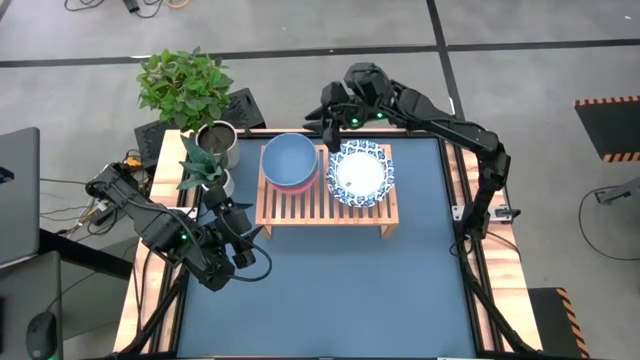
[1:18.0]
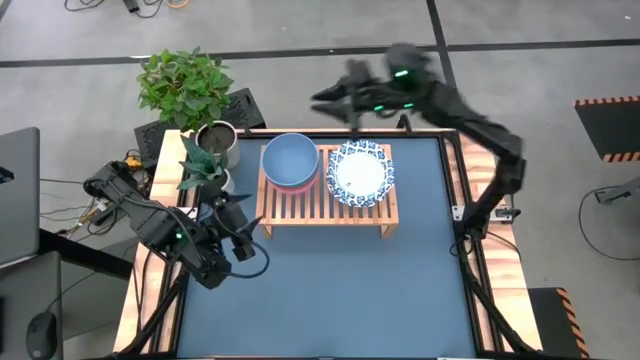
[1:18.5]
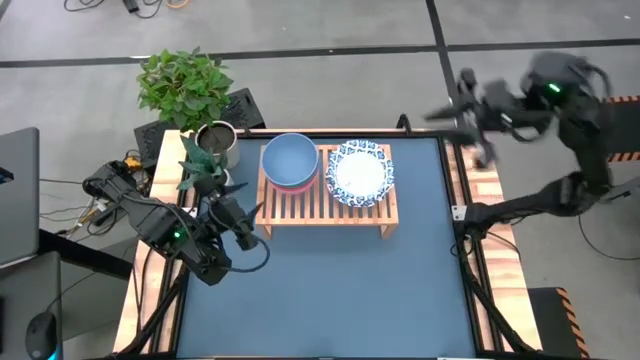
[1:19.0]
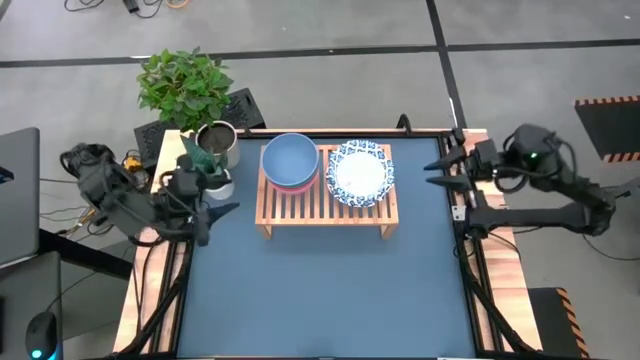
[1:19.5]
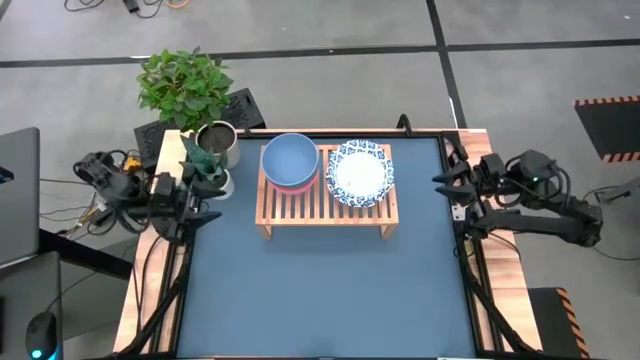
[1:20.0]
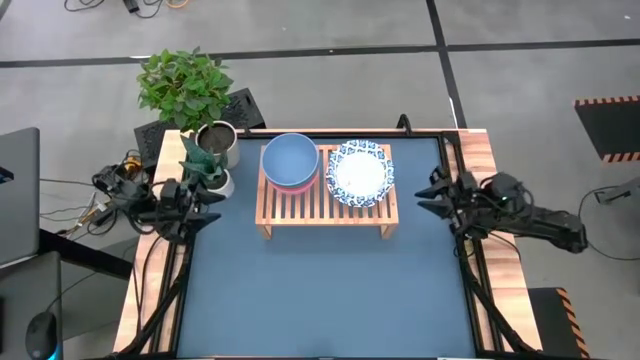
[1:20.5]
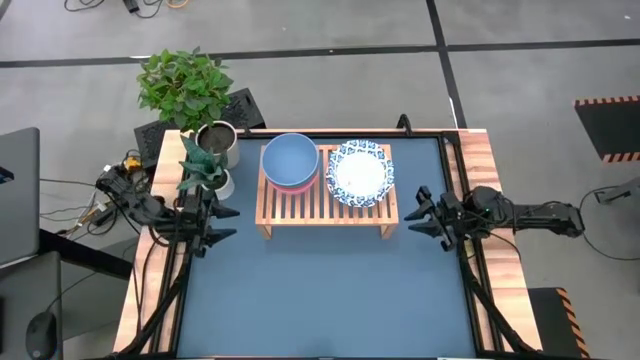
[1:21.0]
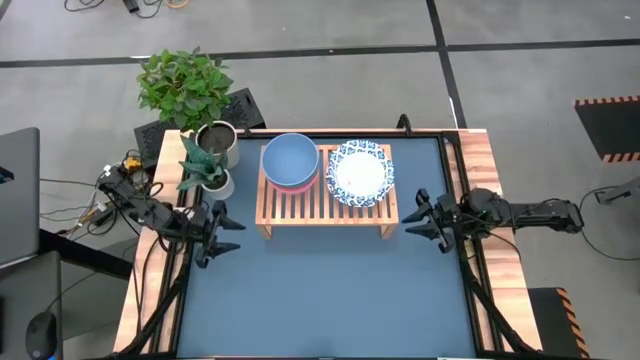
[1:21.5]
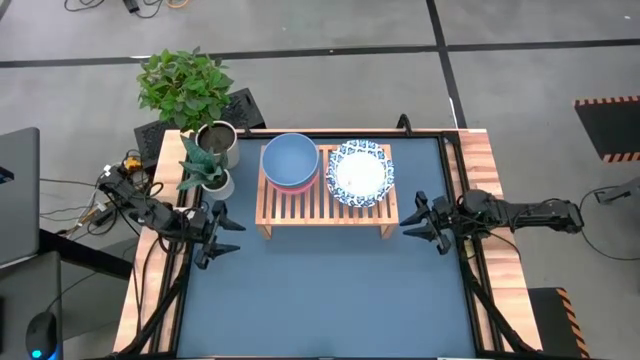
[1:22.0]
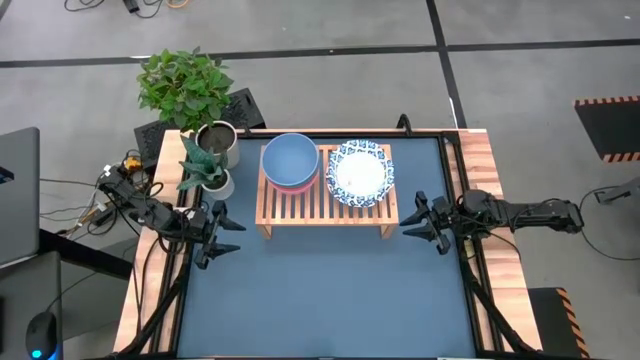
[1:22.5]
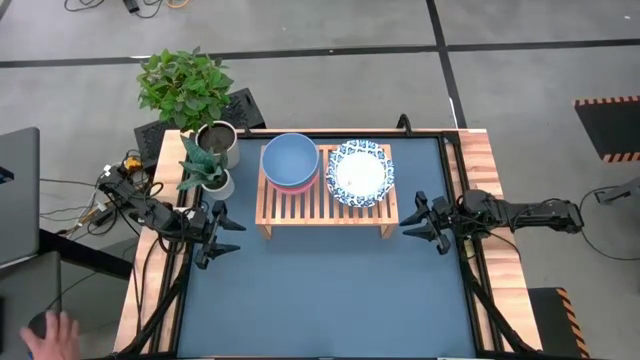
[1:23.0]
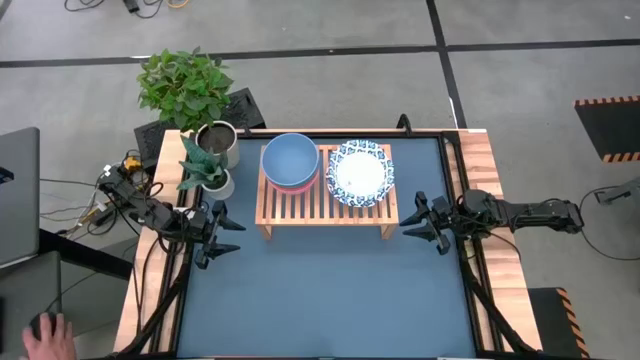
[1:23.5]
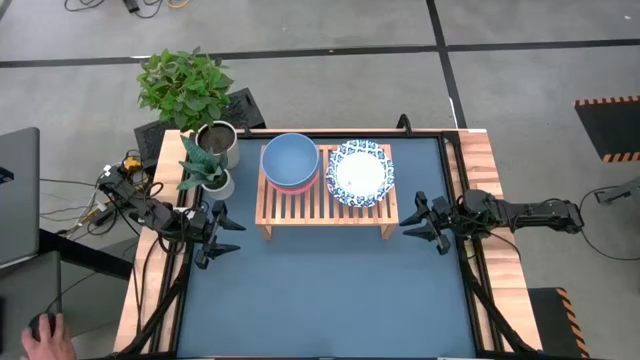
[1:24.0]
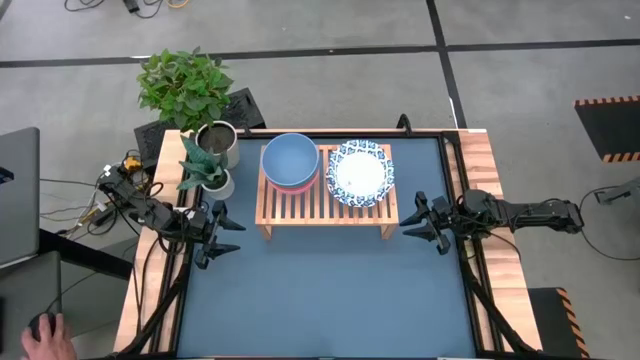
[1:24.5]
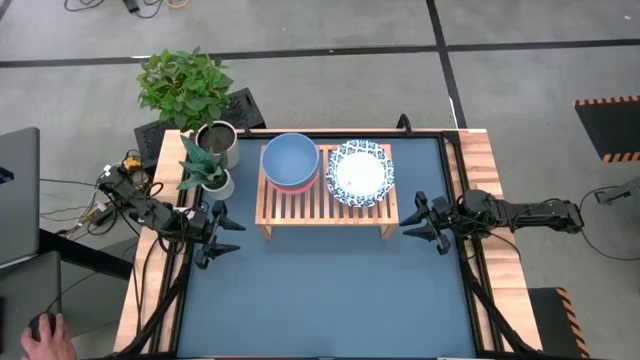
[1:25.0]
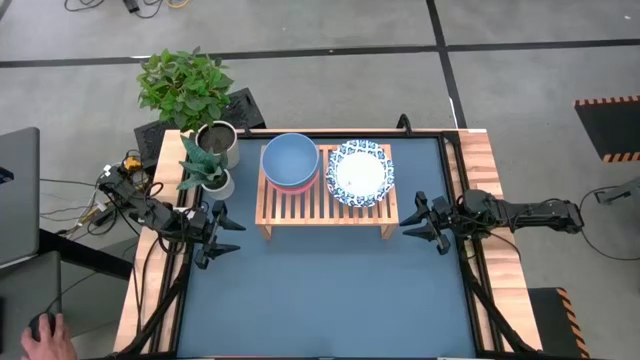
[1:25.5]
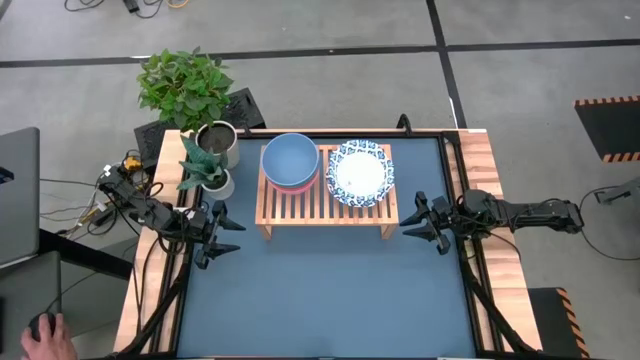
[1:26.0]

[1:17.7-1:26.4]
Task: Place and stack bowls onto a shelf
Return to Home Position

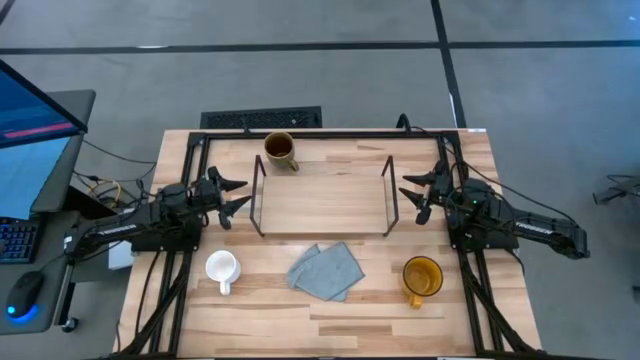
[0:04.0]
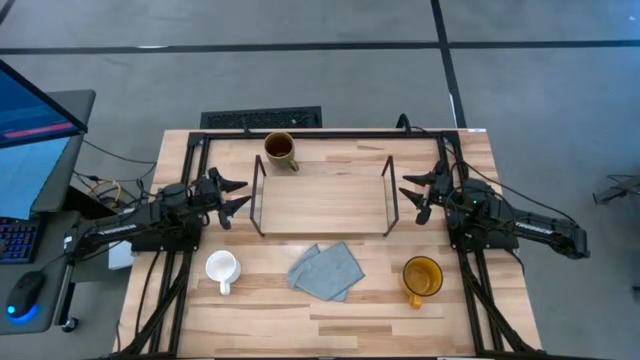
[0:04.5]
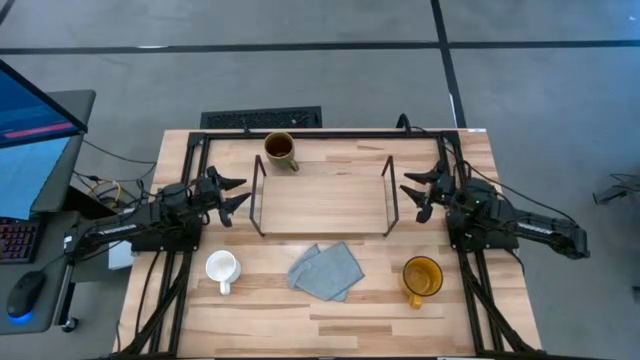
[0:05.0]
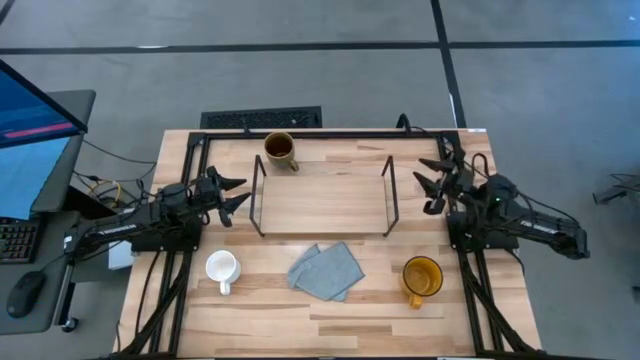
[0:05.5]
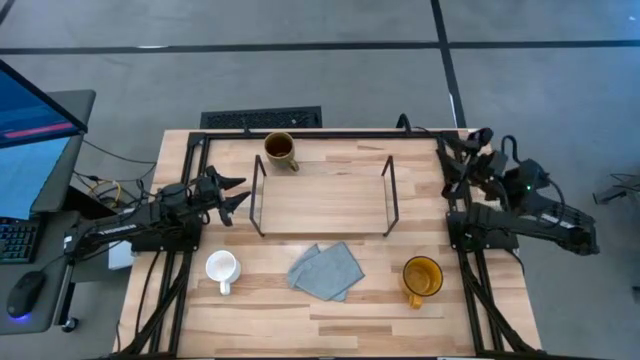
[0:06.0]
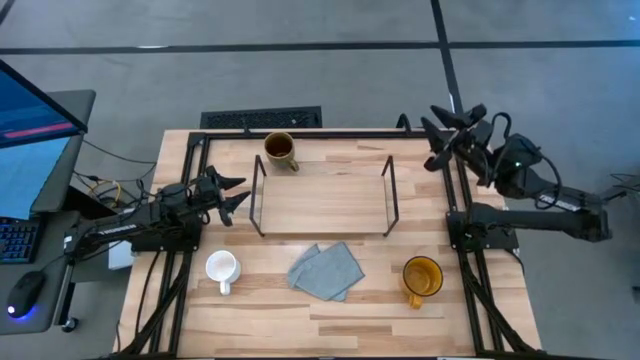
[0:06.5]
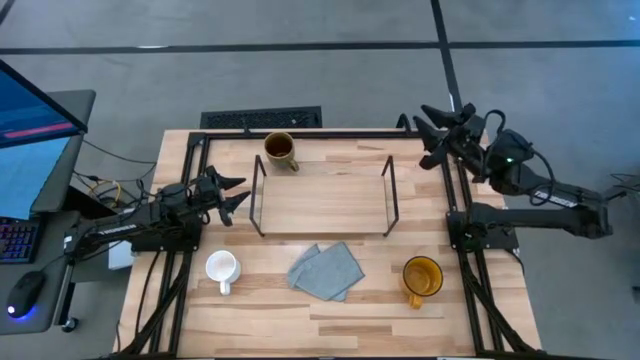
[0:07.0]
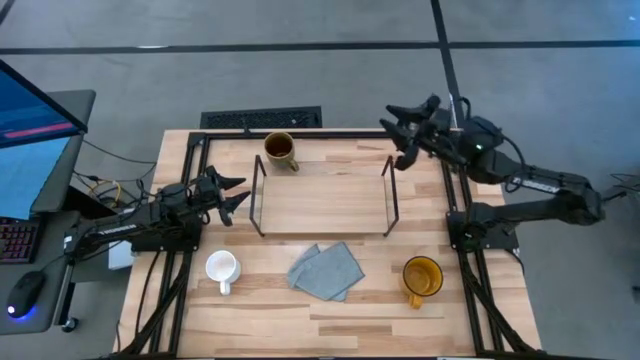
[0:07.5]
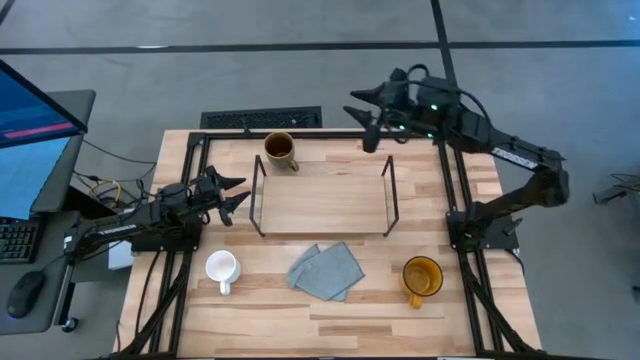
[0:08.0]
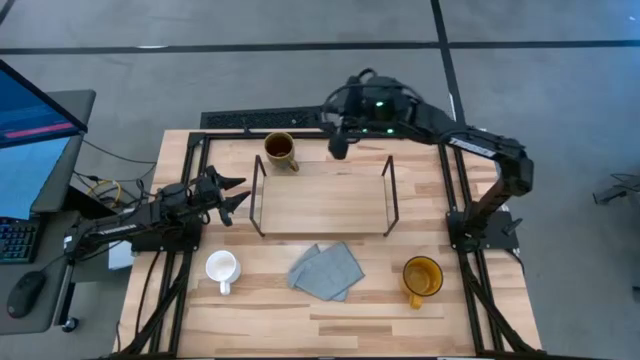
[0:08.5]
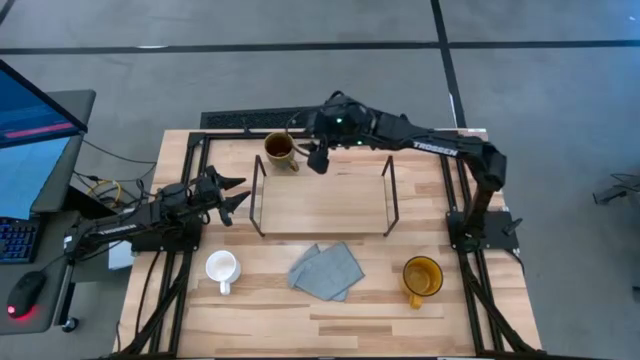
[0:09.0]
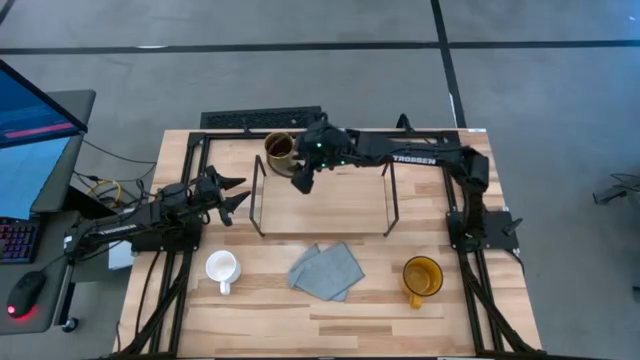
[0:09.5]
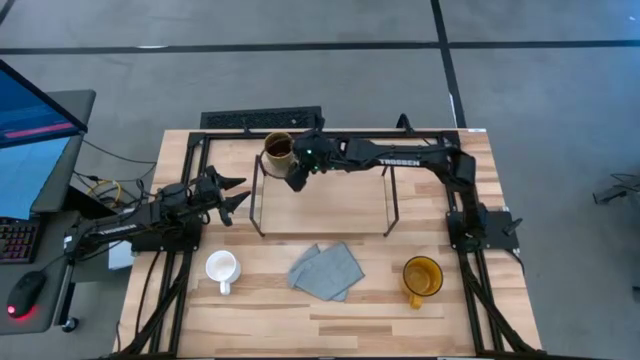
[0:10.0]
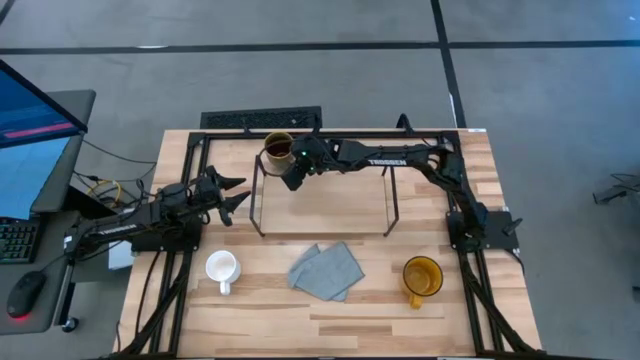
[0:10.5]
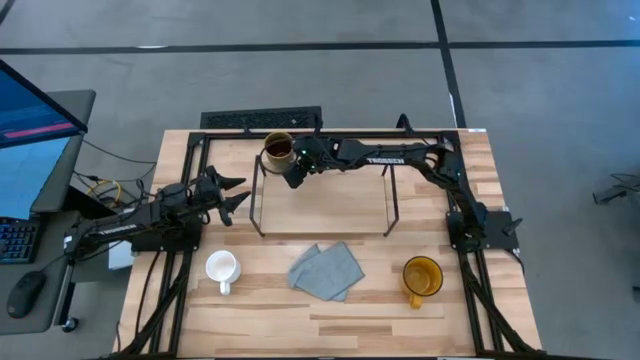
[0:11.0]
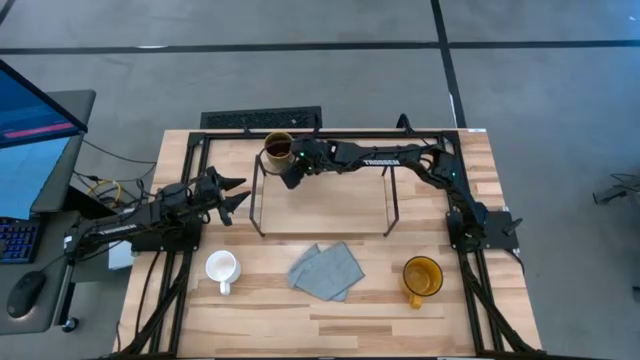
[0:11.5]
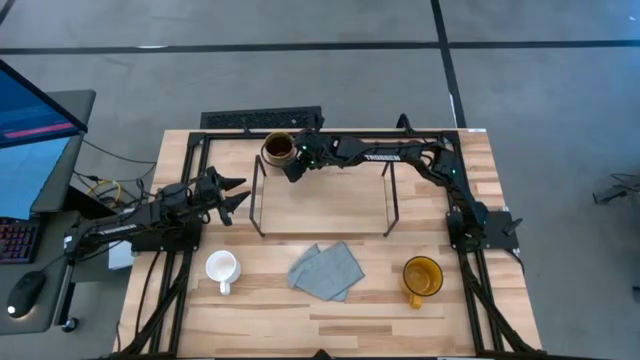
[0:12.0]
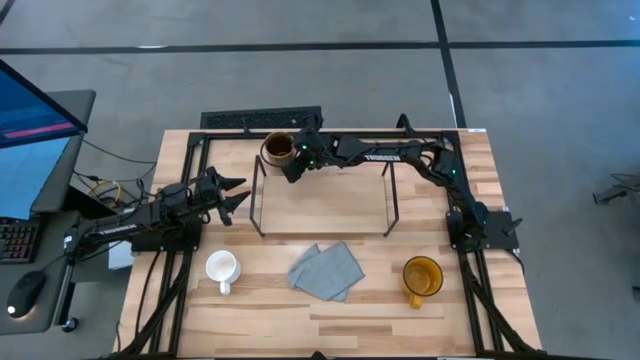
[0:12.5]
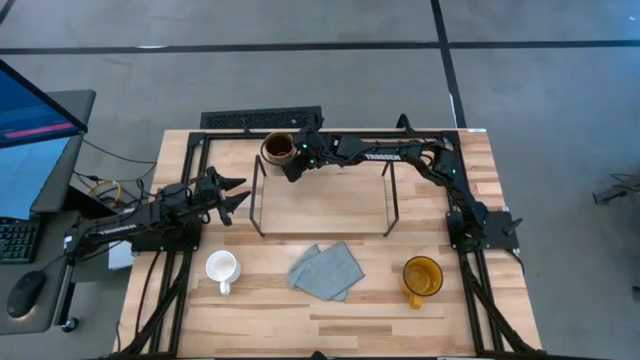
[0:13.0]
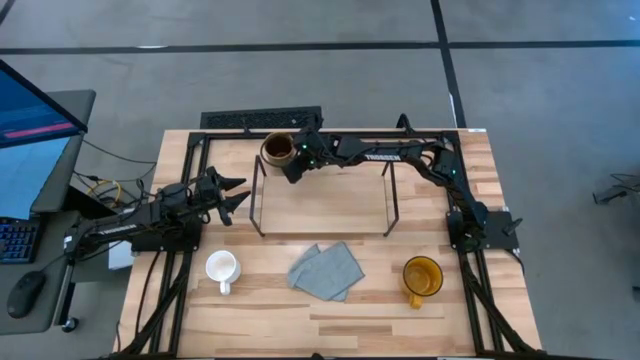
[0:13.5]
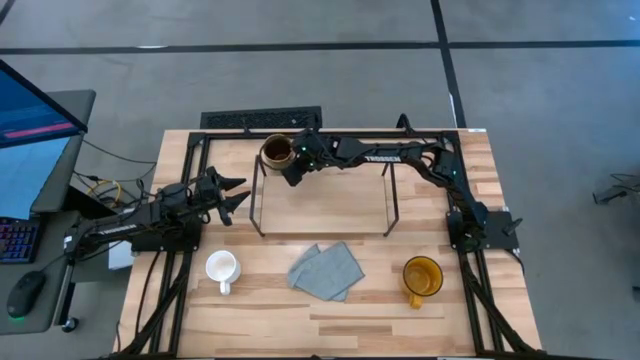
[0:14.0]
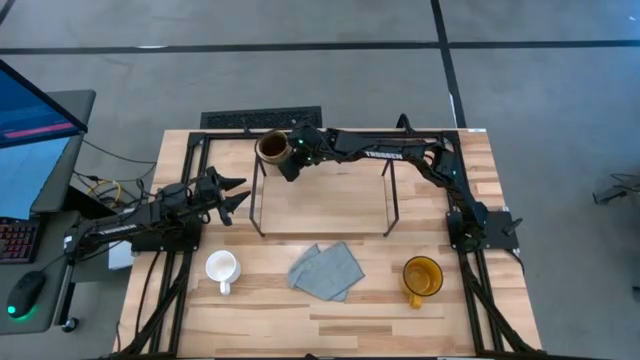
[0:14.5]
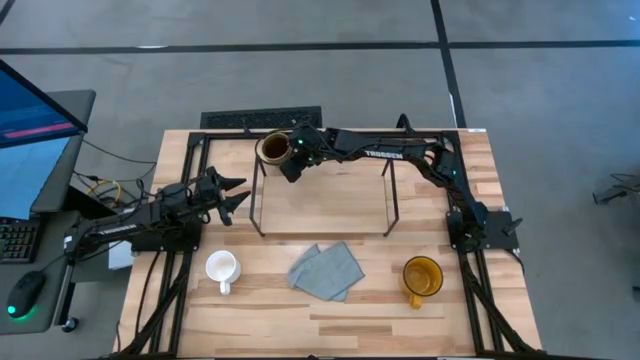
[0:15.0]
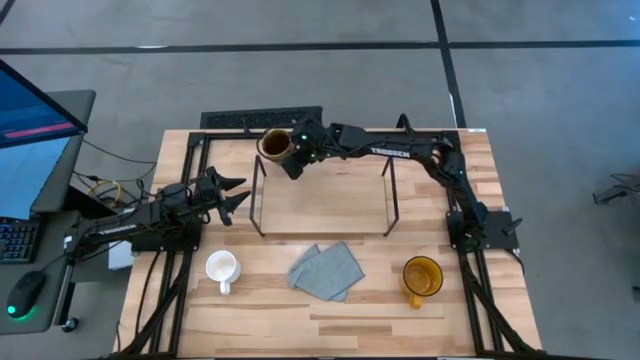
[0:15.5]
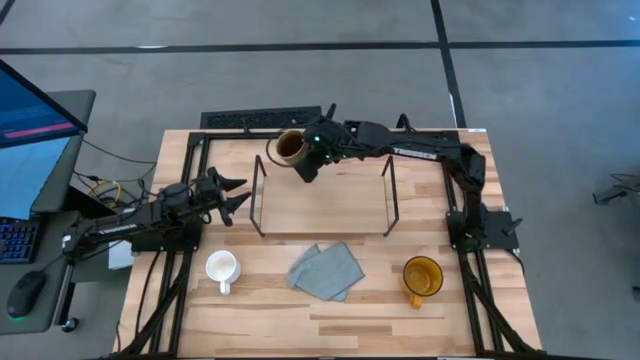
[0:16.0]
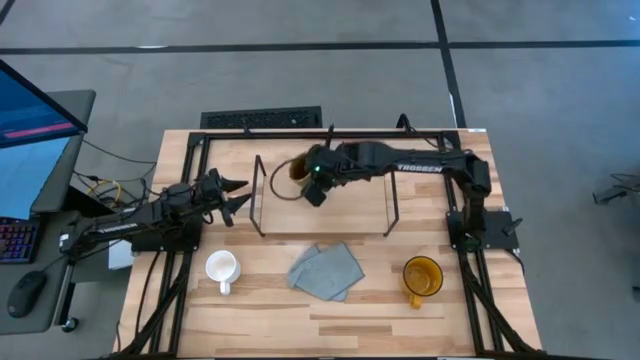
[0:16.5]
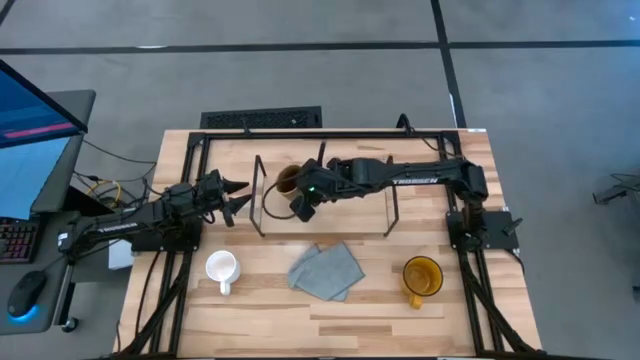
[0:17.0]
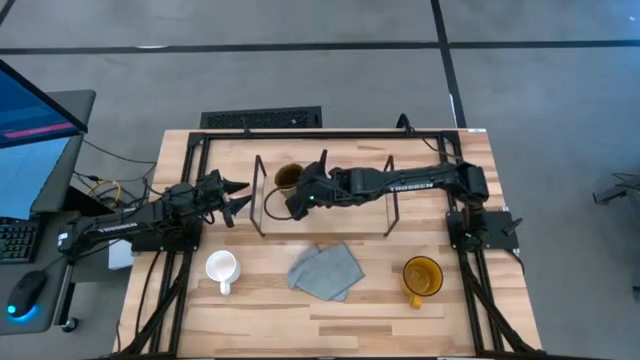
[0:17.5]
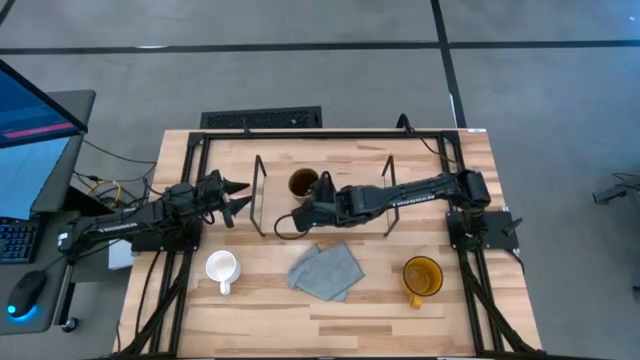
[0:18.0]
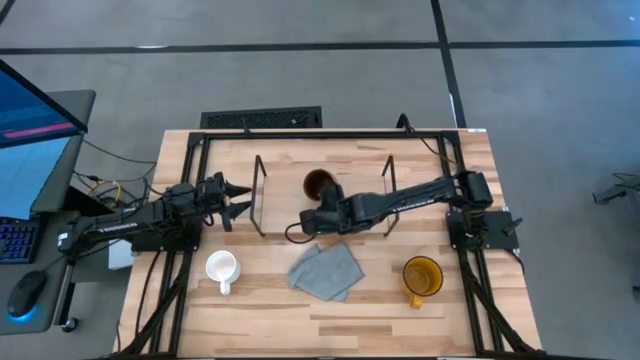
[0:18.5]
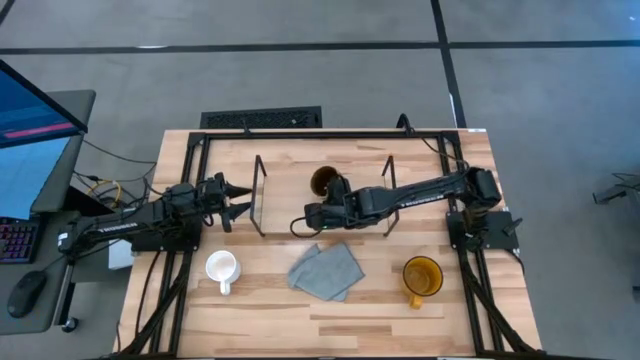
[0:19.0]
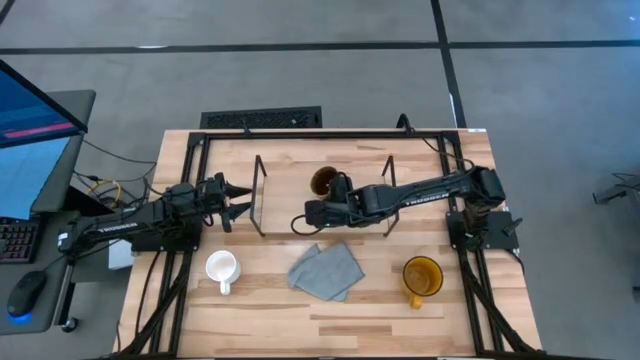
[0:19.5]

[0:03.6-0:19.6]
Task: Stack small to large cups/mugs on shelf
Put the brown mug on the shelf
